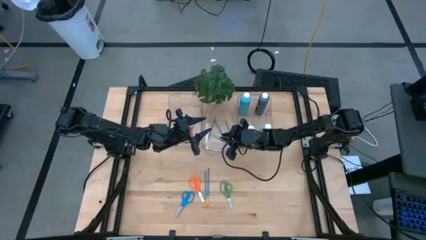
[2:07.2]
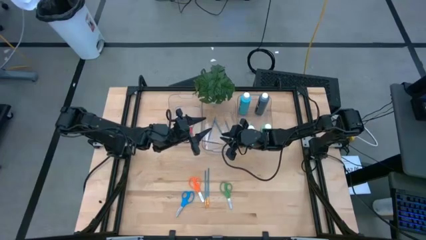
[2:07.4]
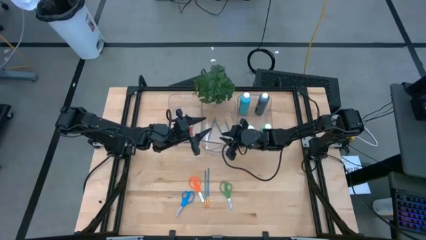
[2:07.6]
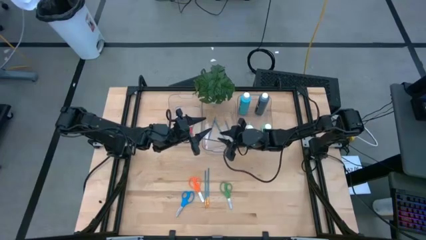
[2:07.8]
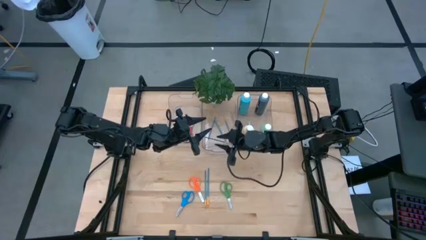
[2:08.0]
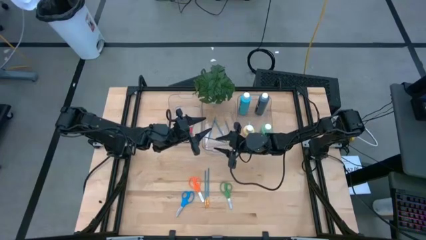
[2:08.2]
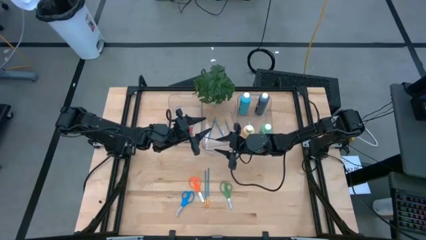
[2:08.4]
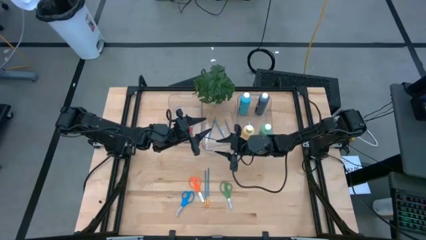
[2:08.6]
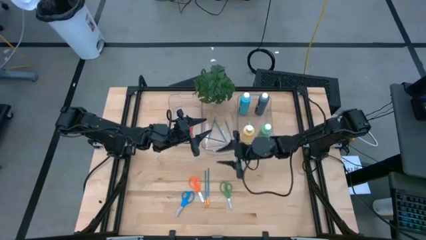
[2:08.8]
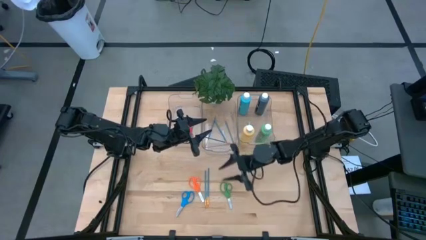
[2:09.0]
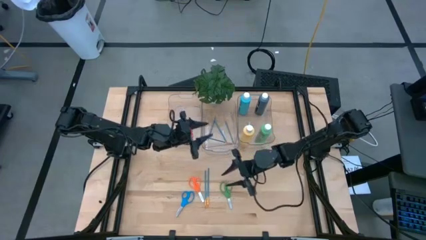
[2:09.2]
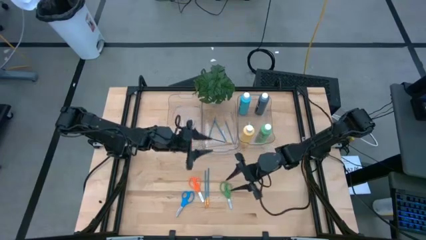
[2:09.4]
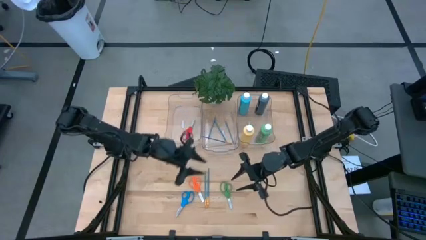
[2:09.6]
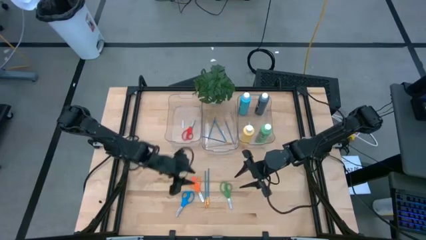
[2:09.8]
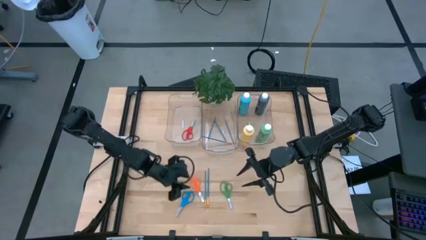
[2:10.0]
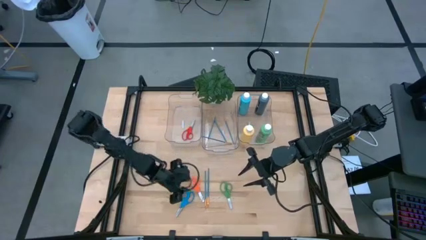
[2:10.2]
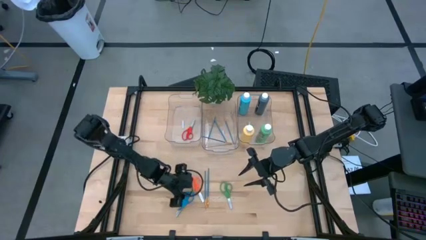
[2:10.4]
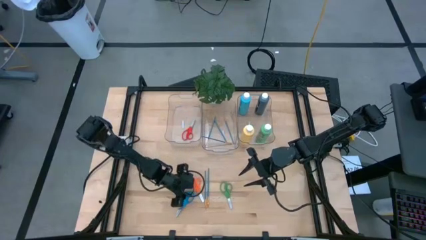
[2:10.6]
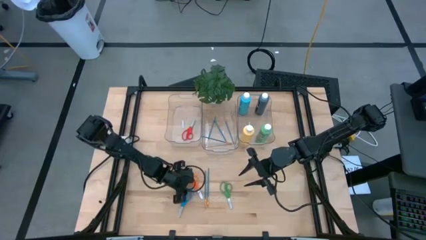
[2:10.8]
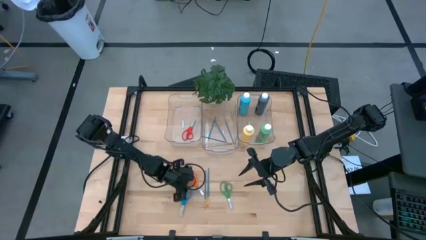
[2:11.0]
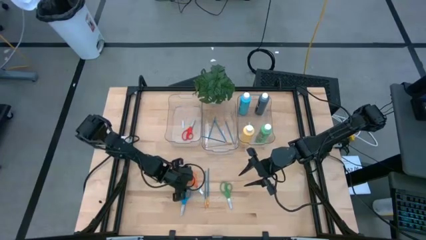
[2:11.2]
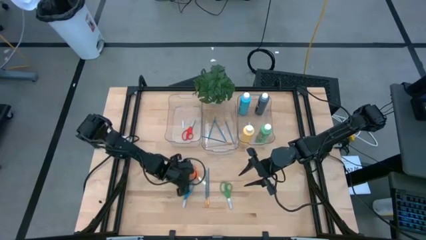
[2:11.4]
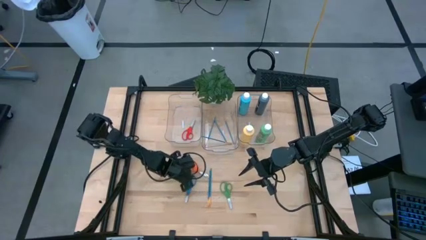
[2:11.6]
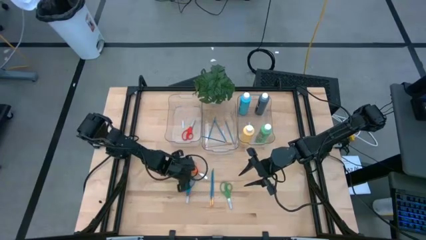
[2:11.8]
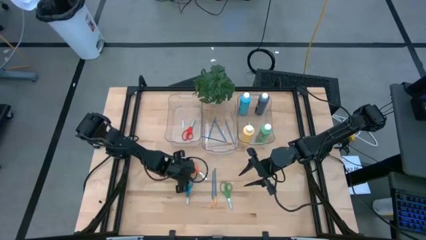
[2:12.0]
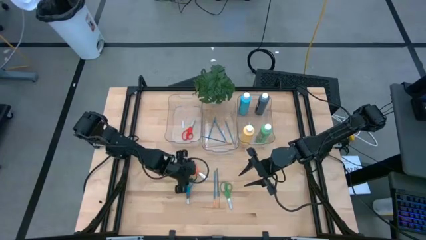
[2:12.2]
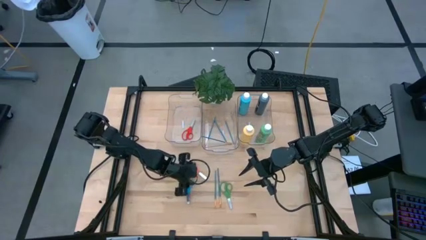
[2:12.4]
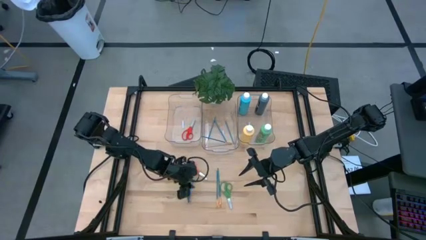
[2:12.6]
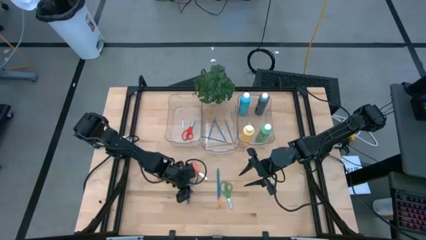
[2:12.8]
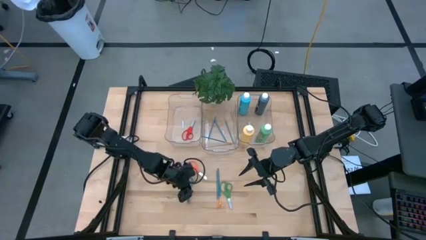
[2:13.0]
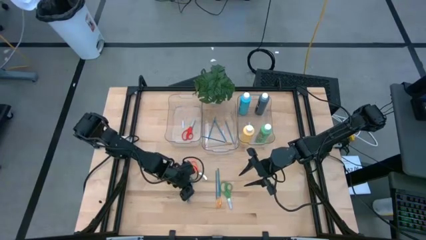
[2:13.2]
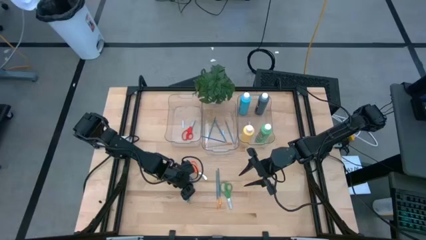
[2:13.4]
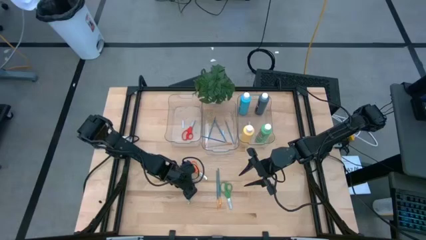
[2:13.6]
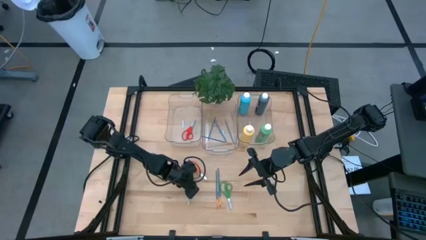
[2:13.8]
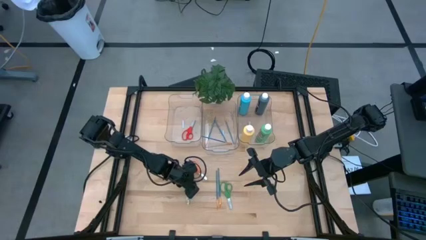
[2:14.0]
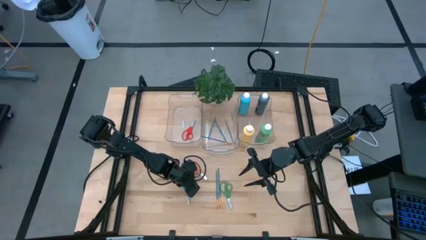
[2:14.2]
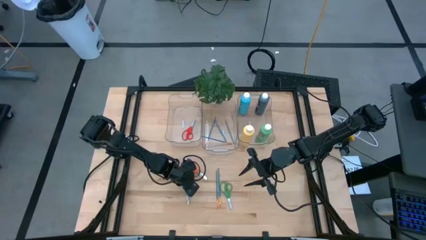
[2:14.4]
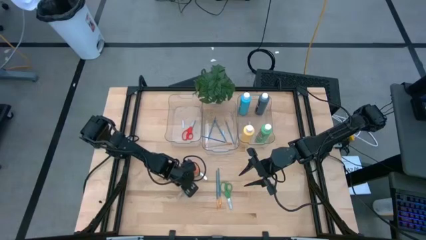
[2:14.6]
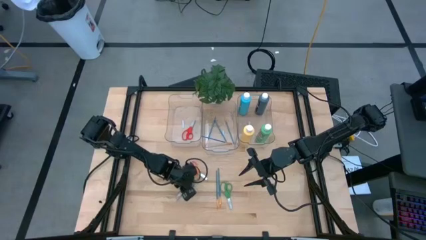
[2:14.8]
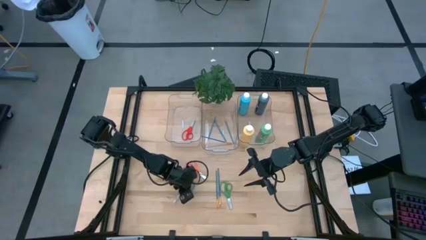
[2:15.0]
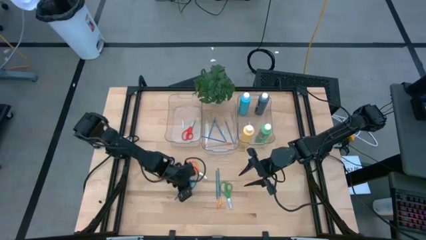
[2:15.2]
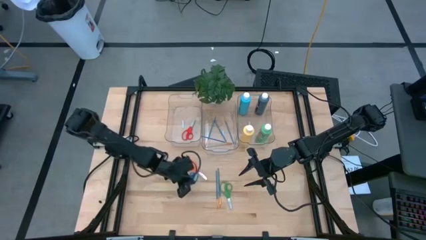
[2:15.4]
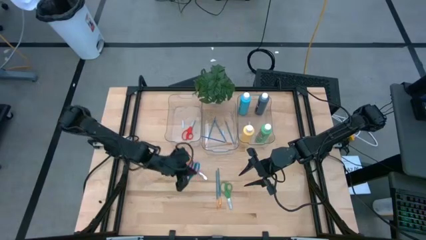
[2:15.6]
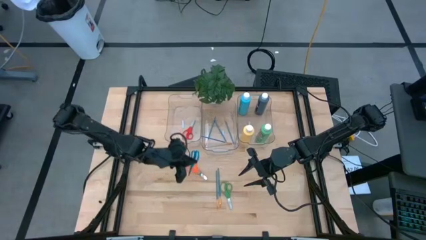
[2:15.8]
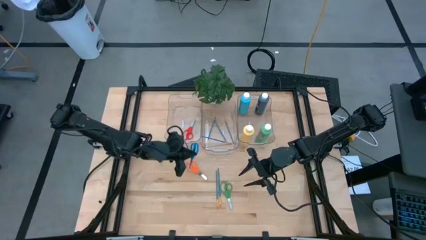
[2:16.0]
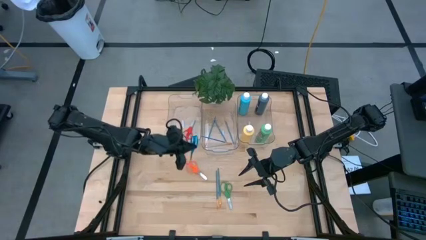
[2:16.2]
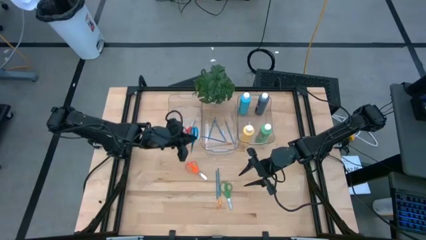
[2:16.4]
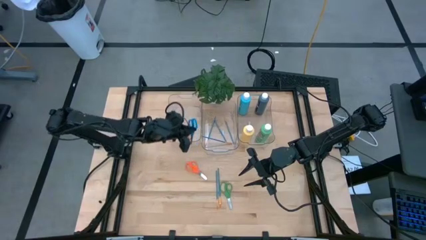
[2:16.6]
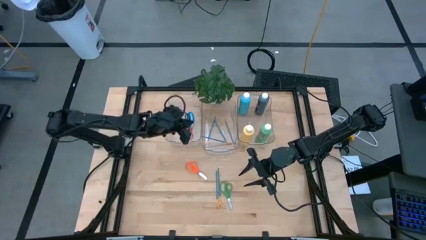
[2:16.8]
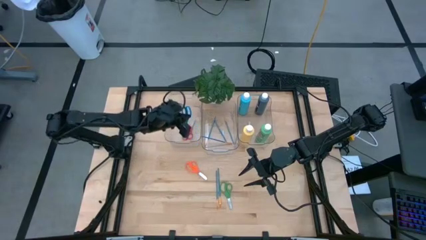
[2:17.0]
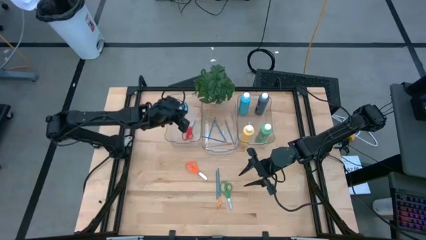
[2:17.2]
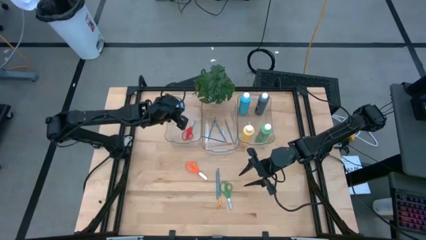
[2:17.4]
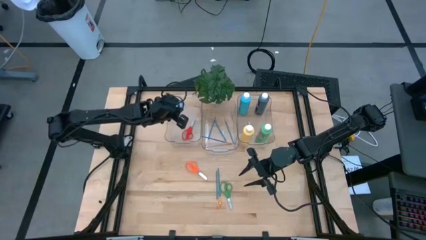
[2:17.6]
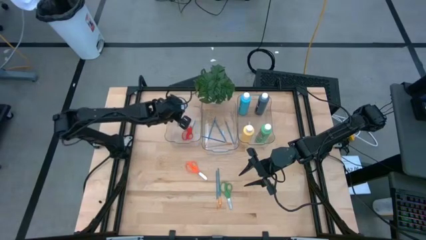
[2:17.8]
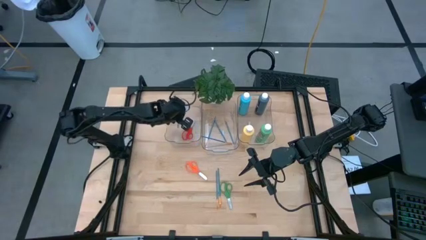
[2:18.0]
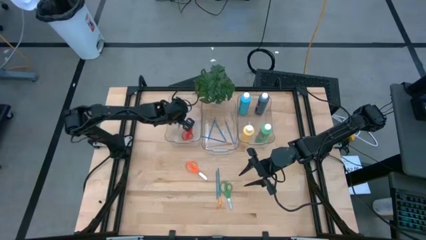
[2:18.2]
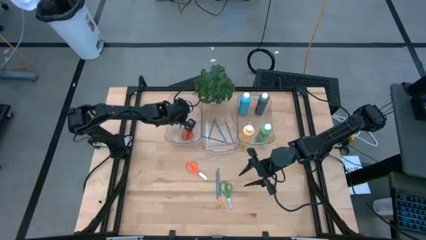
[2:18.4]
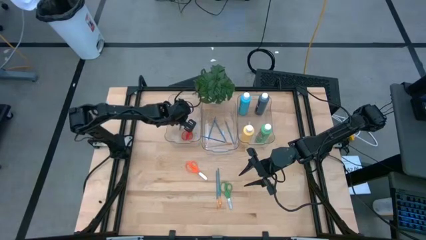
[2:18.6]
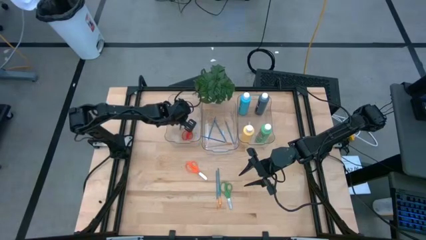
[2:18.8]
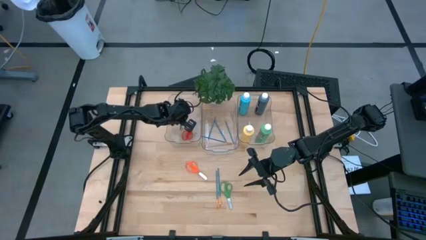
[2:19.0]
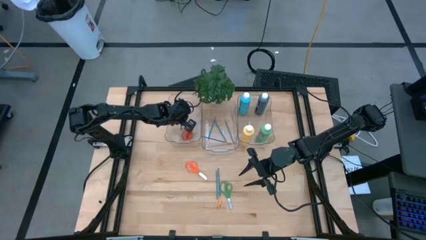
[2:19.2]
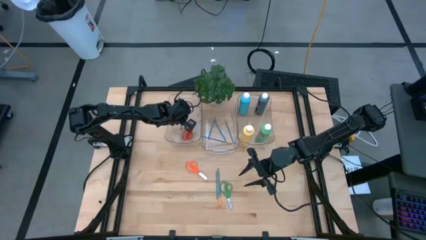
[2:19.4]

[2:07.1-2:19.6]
Task: Pick & Place Paint Supplies
Put the blue scissors into the left transparent bin

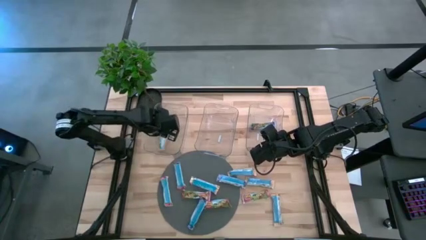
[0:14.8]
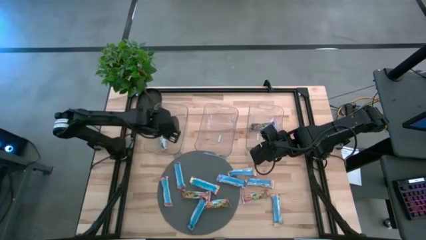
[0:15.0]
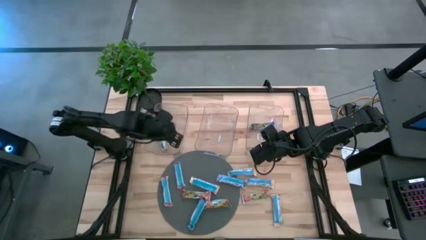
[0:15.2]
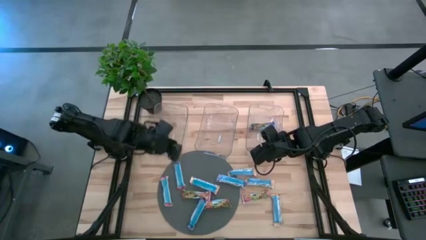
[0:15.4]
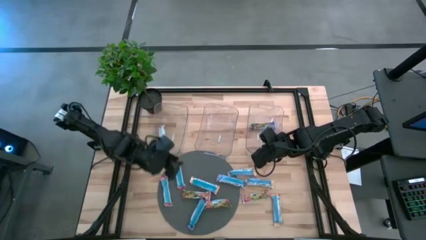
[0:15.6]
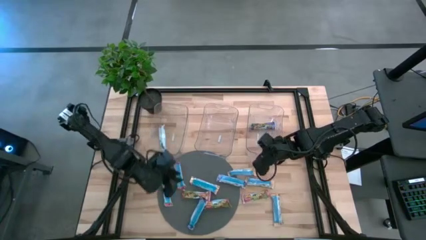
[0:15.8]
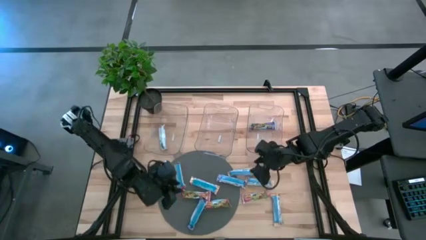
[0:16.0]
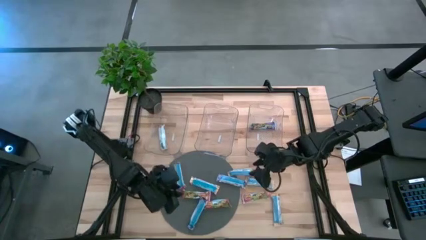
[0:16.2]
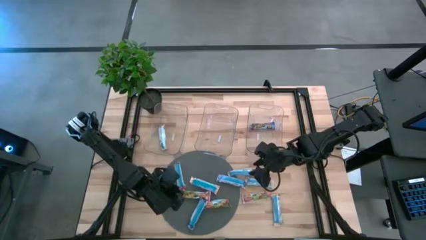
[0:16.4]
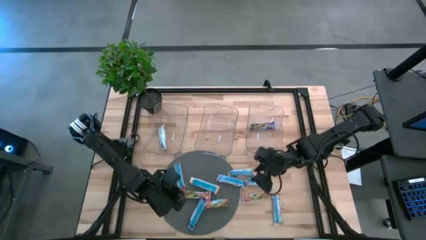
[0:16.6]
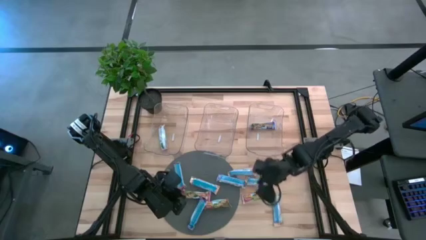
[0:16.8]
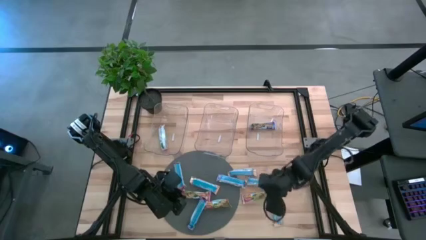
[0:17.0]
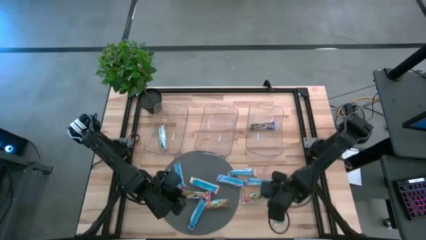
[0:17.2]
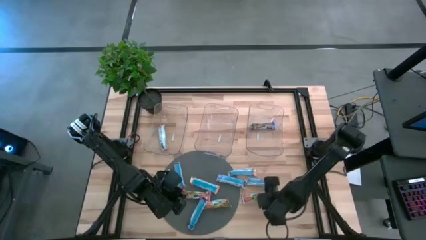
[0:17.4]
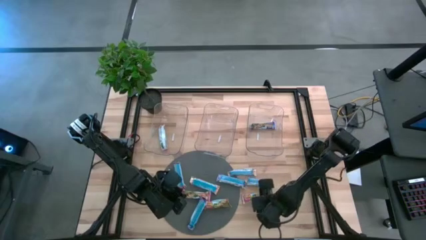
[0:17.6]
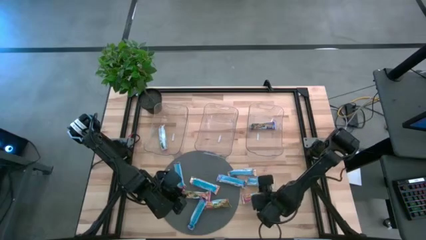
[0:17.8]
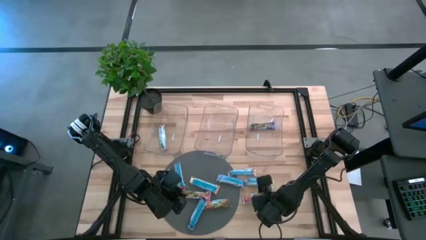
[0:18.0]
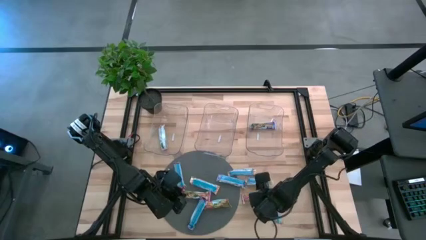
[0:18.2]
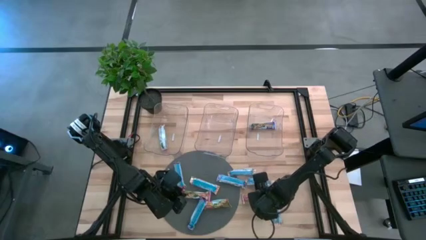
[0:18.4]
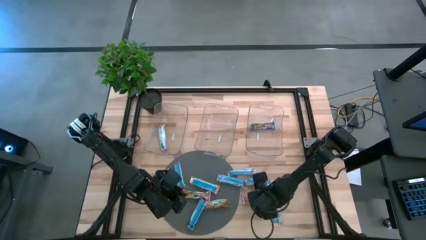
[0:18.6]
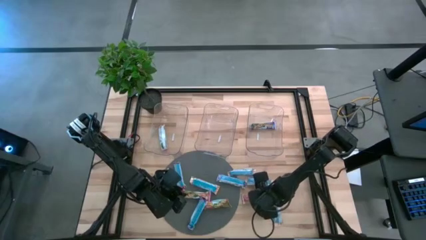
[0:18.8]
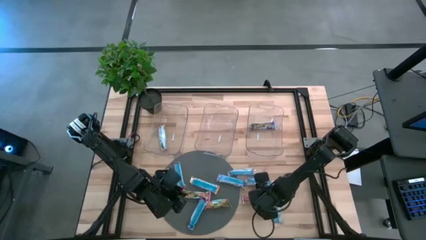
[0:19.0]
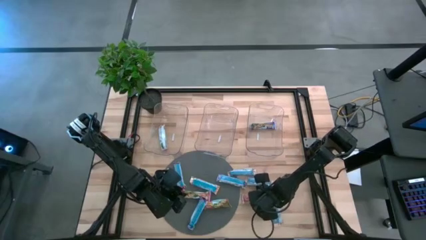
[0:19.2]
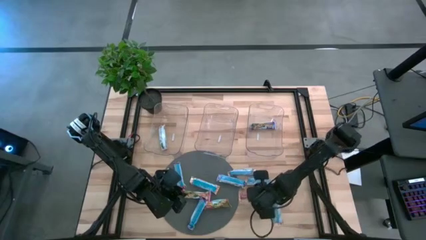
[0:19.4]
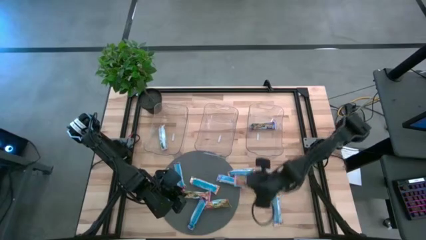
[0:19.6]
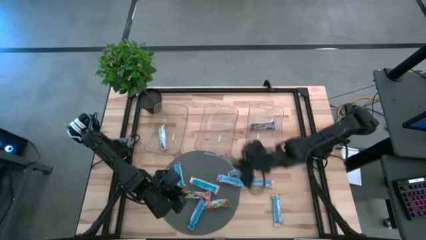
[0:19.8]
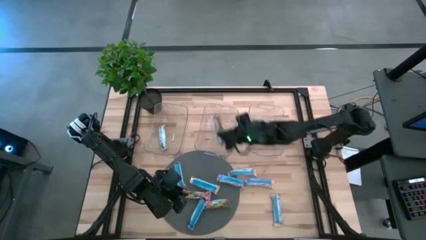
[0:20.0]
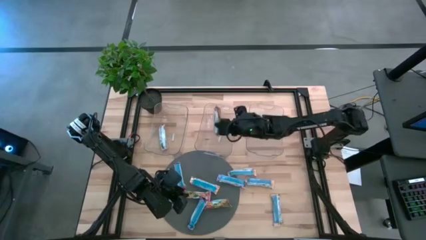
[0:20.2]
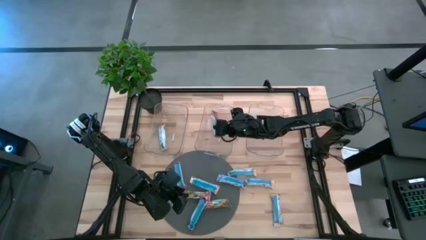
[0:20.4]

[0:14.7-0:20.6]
Task: Pick and place Granola Bars by type
Put the red granola bar into the middle transparent bin
